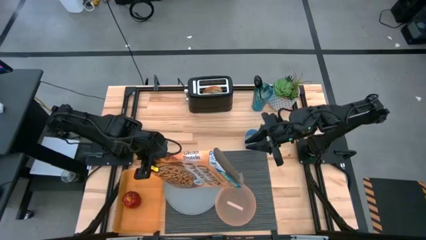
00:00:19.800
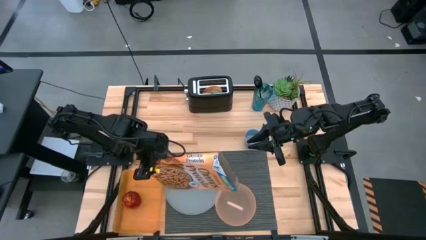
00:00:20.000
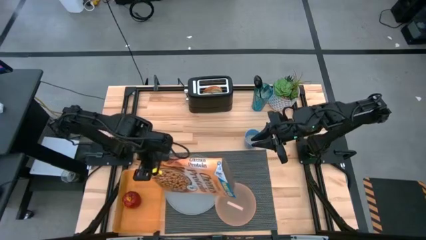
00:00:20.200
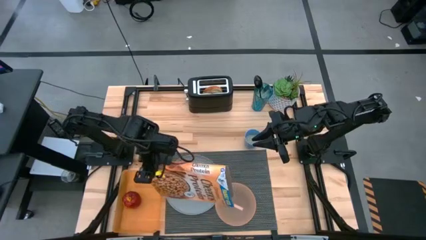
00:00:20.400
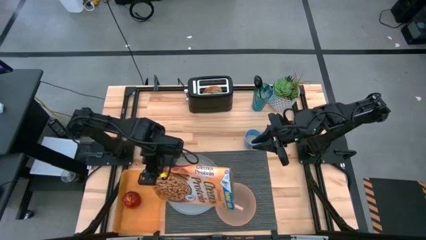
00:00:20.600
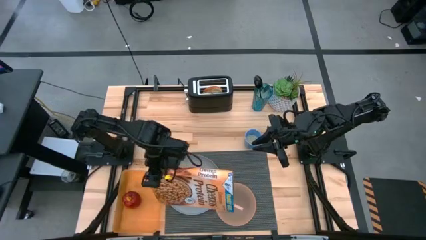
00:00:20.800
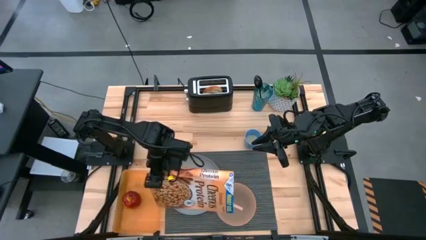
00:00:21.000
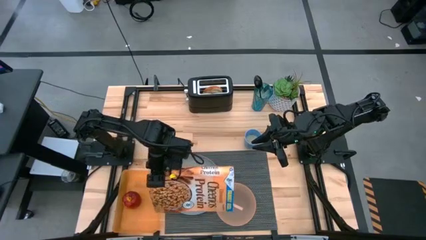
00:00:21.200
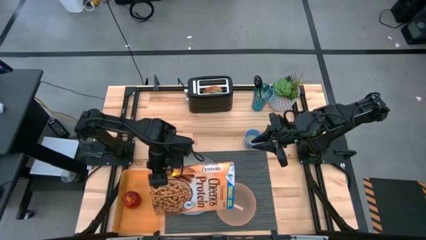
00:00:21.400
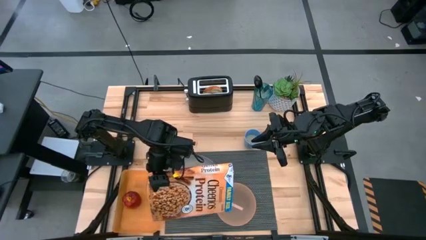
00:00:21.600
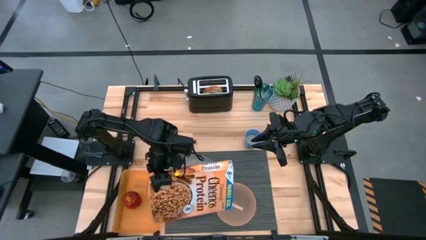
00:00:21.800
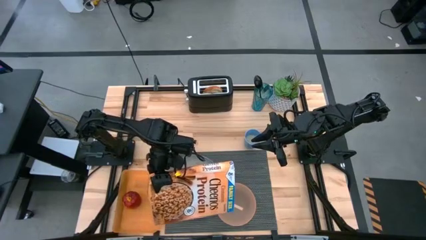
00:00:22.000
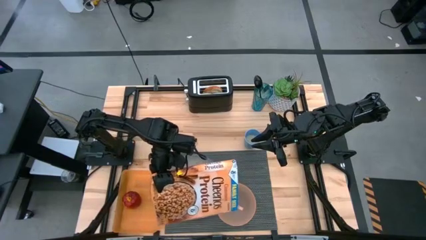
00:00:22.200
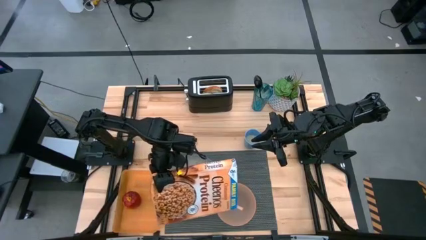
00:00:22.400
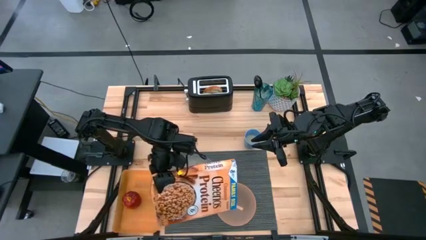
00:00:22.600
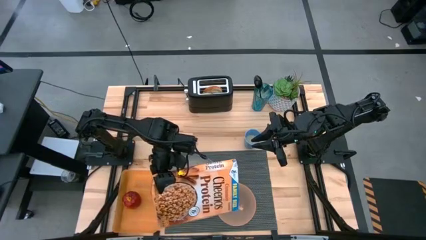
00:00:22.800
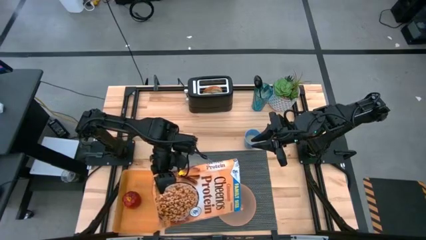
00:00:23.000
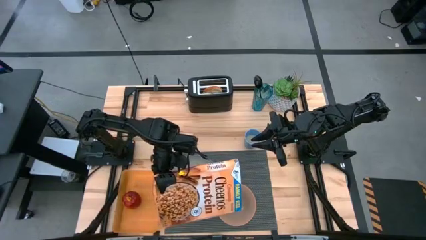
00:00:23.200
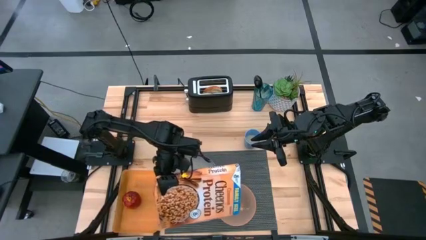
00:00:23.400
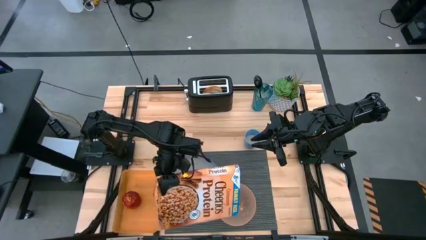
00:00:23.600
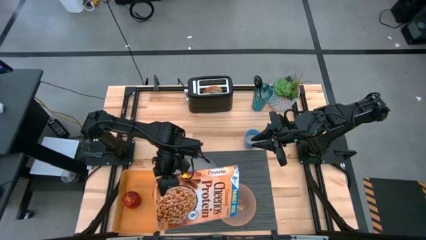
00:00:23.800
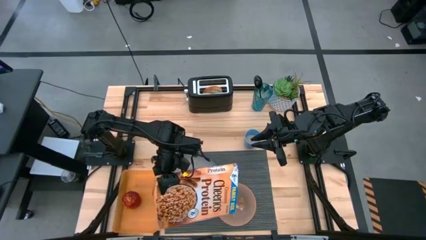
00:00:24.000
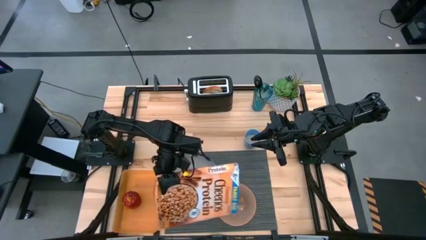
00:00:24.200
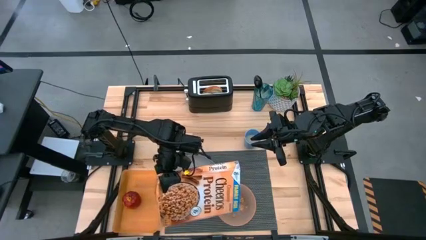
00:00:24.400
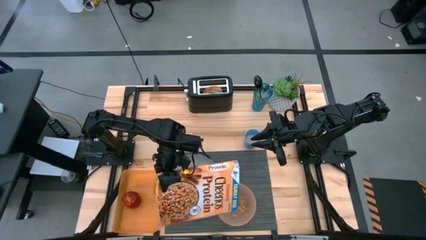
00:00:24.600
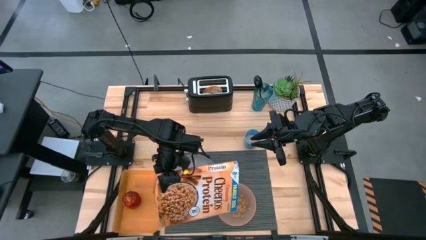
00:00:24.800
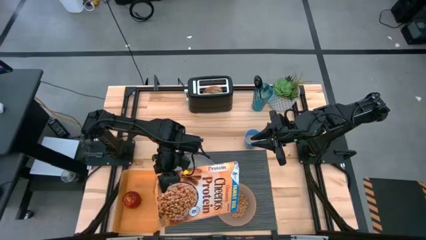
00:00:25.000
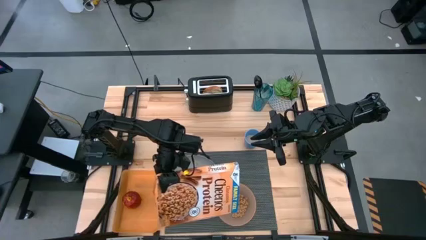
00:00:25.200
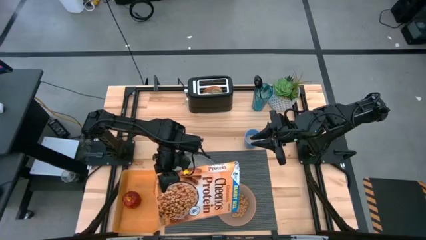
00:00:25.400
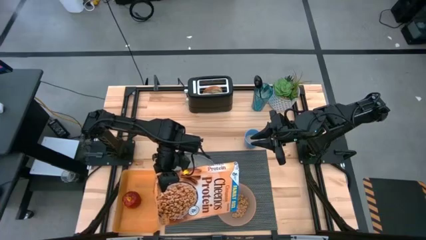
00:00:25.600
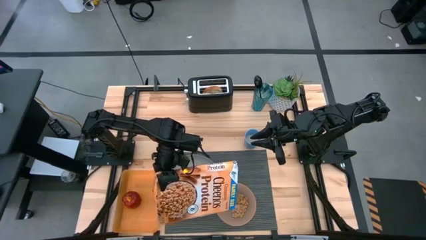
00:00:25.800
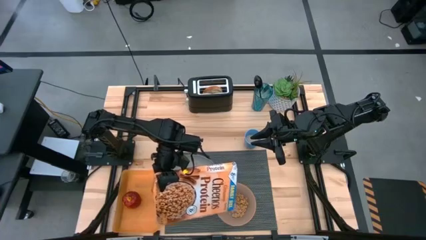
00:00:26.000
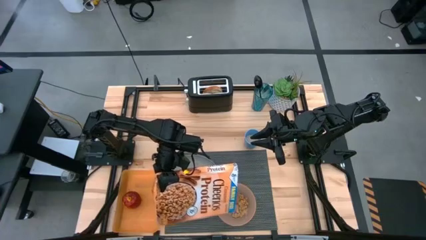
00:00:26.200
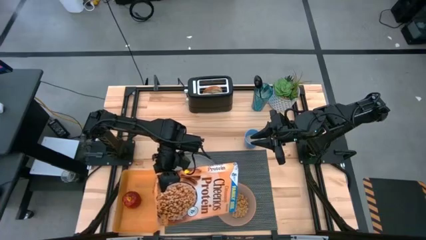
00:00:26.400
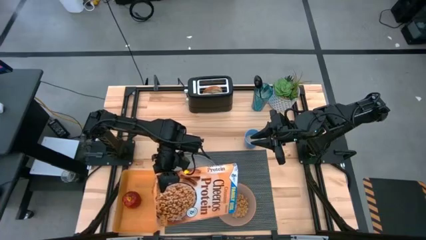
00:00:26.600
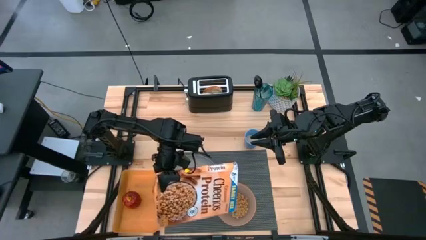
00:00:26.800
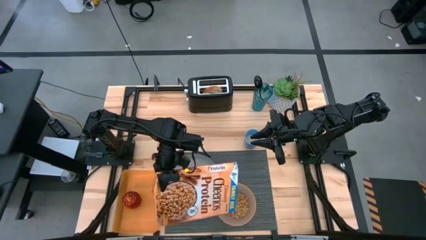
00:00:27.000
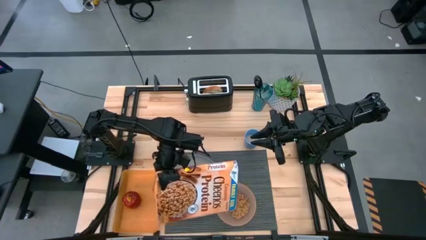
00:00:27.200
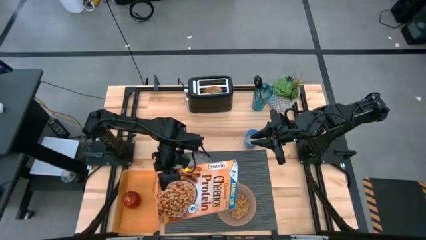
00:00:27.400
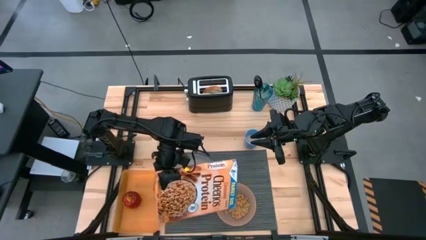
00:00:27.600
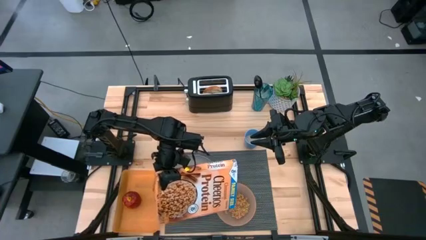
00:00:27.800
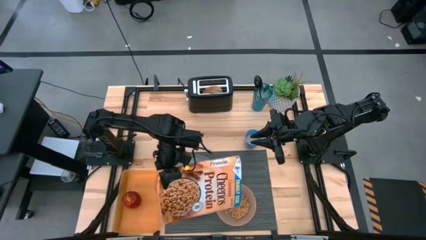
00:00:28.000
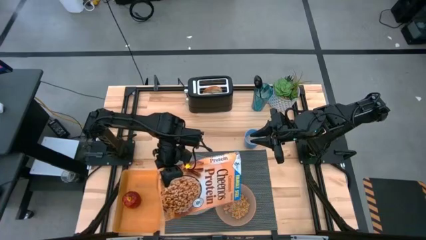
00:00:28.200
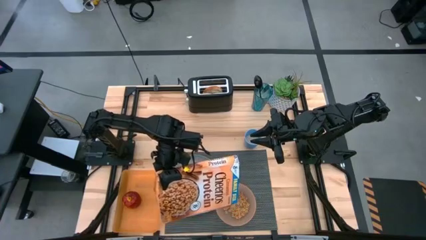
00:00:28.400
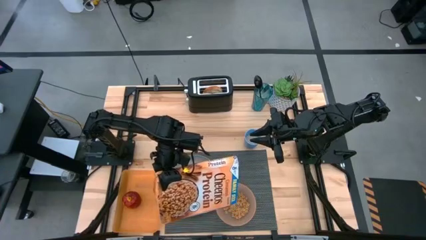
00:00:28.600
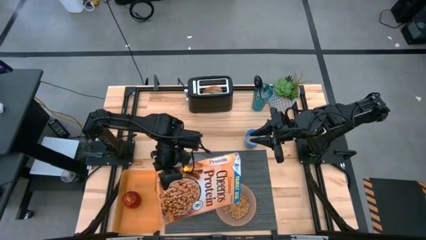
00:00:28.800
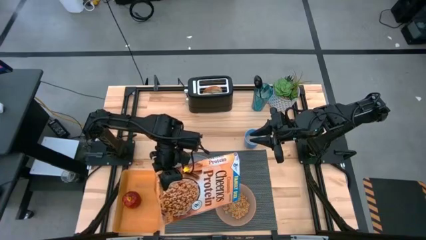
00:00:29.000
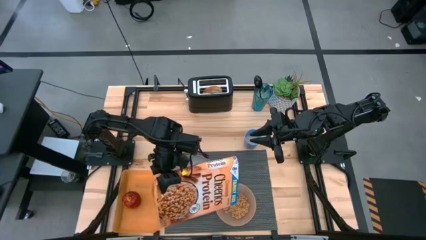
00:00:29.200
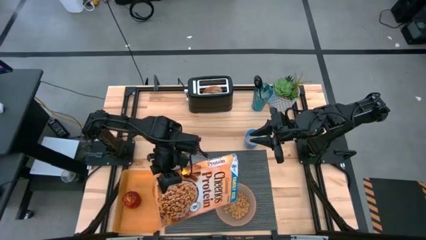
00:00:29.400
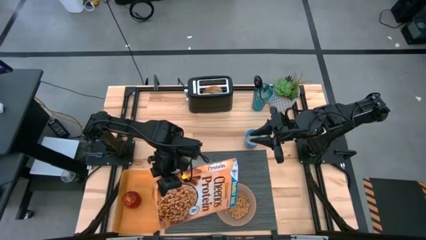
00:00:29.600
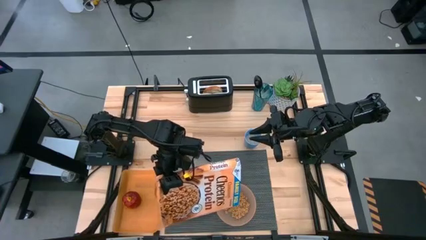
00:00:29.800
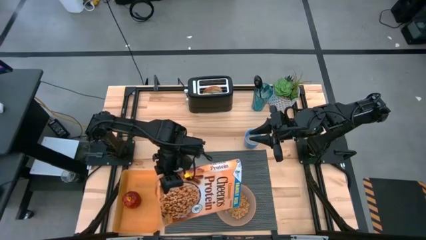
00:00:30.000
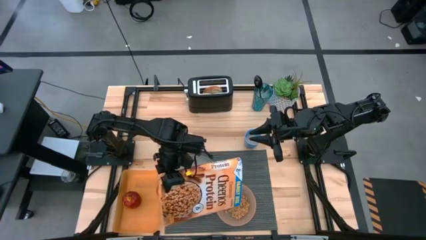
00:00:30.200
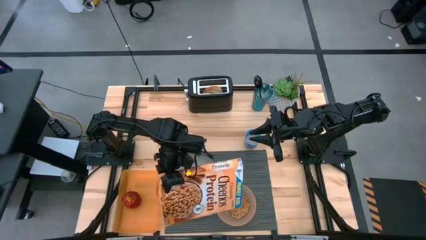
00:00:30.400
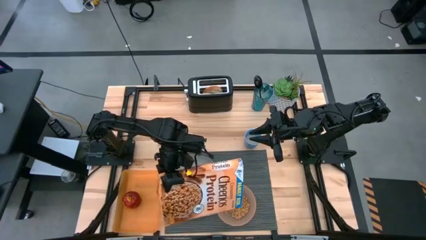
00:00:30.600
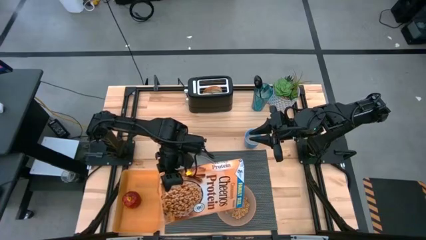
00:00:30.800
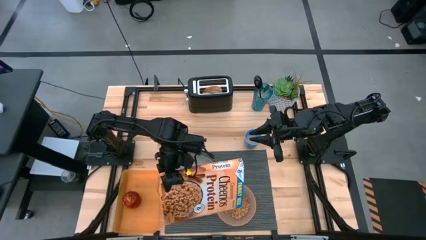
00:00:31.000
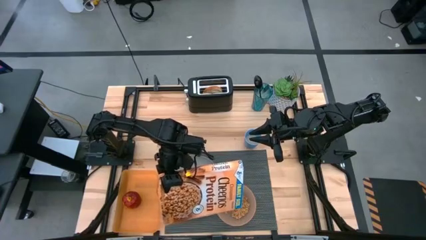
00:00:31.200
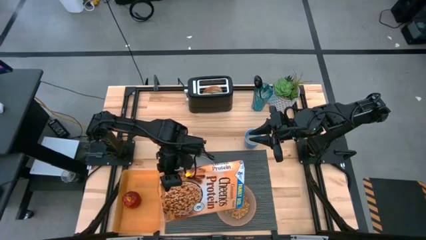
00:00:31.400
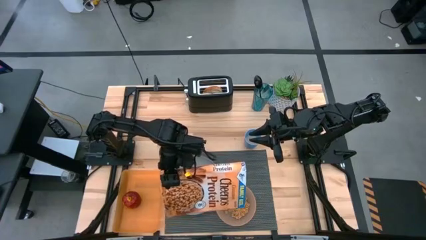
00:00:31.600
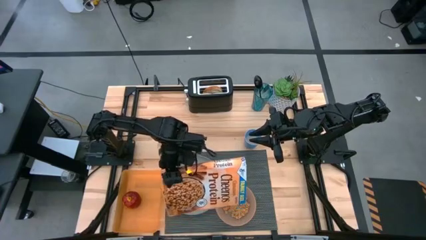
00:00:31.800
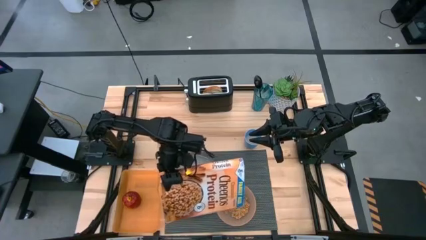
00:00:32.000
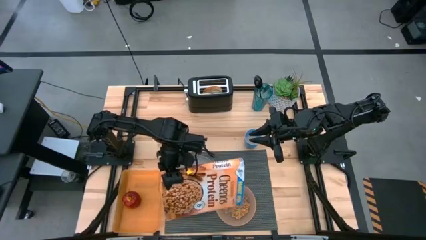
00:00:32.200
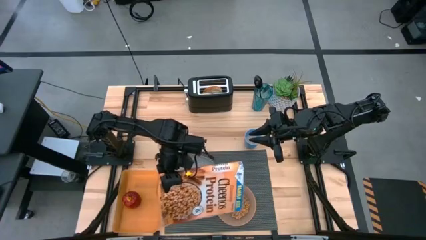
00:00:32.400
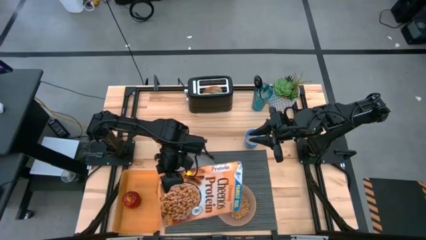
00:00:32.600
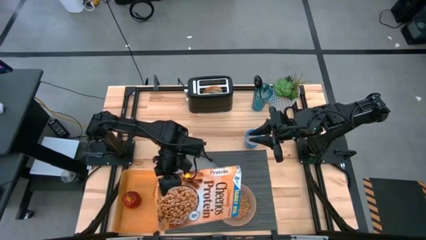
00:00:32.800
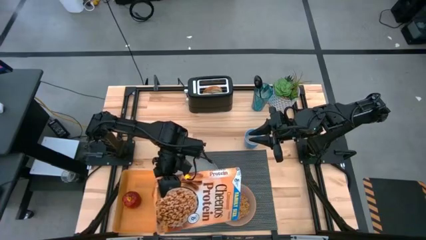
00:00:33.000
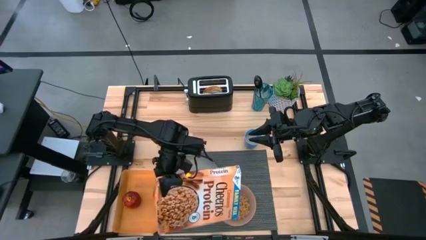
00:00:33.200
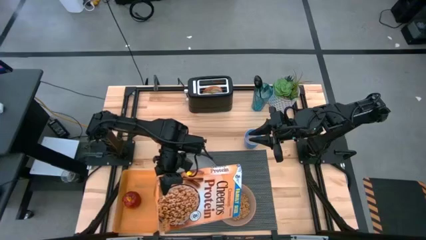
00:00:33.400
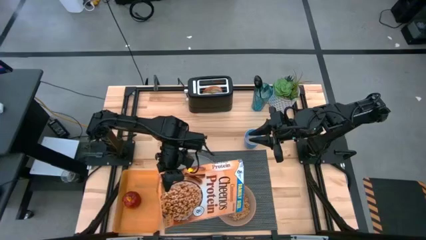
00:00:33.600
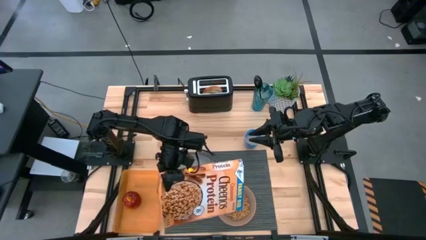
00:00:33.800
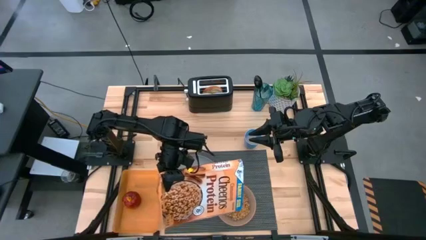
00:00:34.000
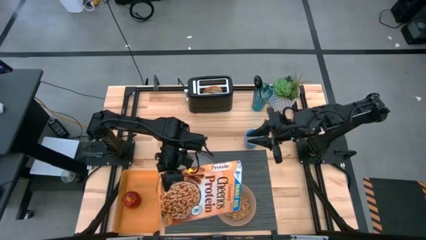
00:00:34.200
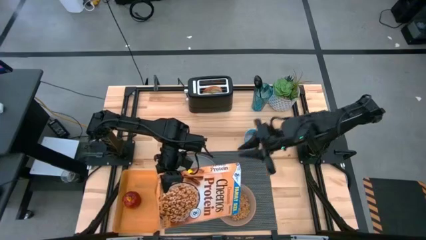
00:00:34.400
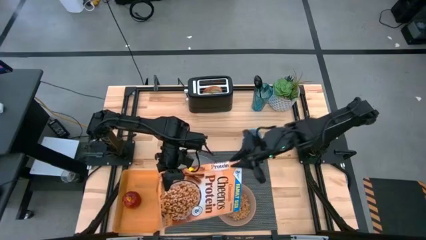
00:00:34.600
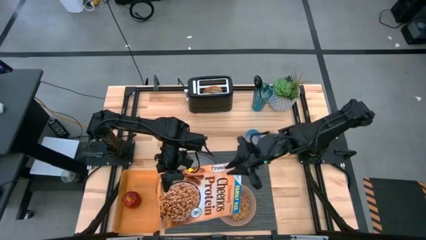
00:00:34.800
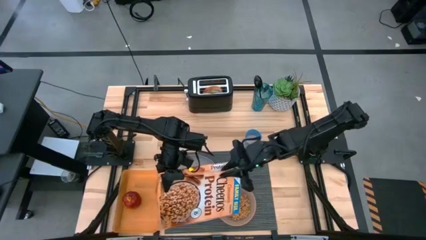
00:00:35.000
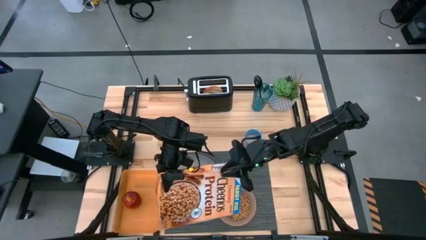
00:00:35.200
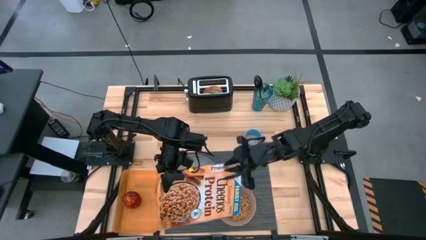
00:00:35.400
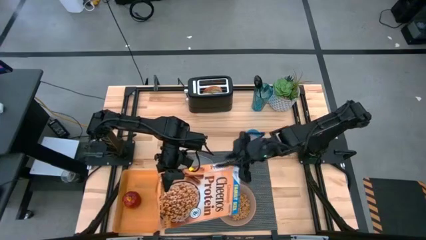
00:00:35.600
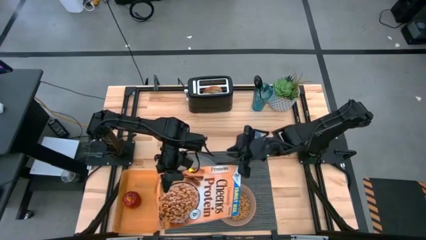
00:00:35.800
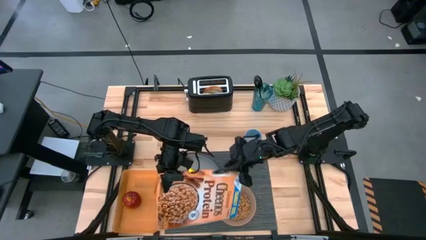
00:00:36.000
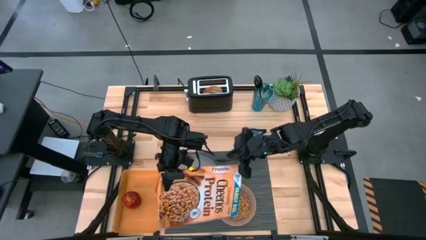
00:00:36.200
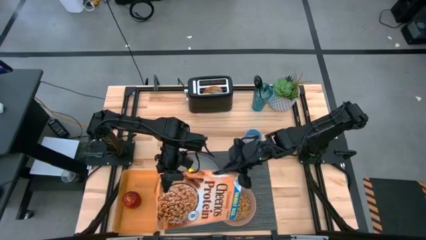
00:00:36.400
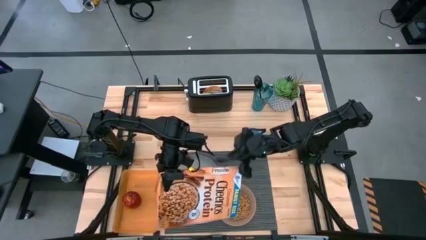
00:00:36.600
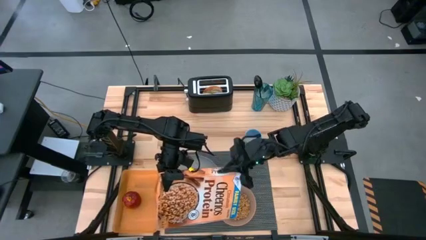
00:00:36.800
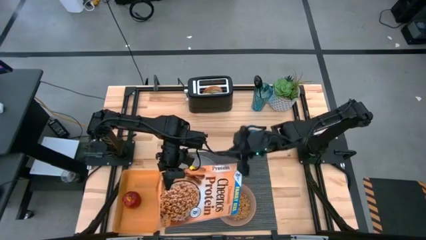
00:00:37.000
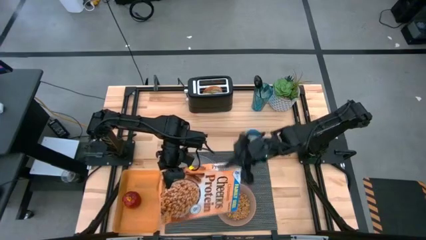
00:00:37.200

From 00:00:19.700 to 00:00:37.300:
Task: Arrange a breakfast setting
Pour the cereal from the cereal box into the orange bowl
